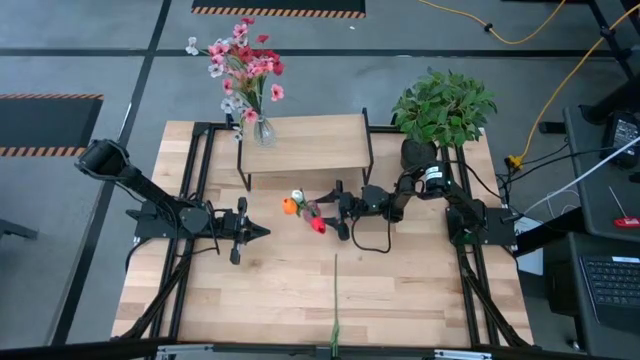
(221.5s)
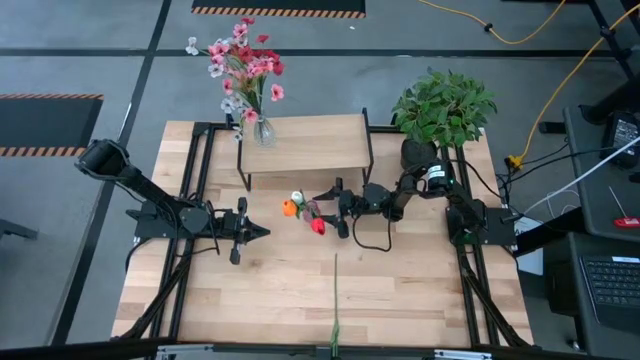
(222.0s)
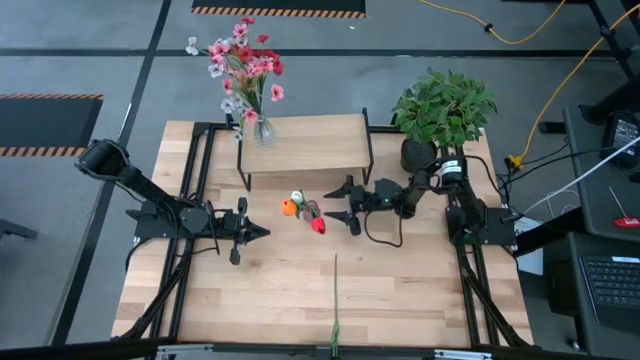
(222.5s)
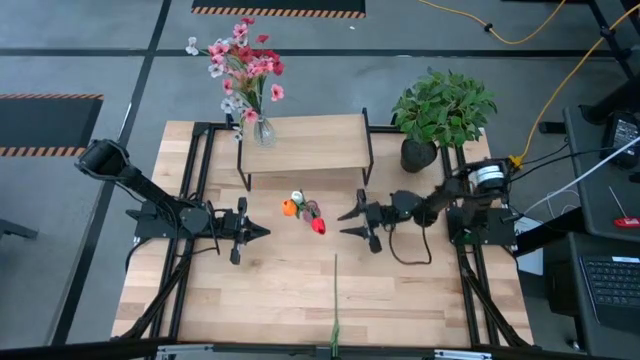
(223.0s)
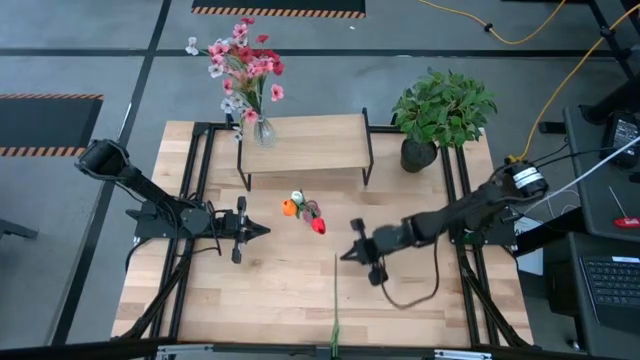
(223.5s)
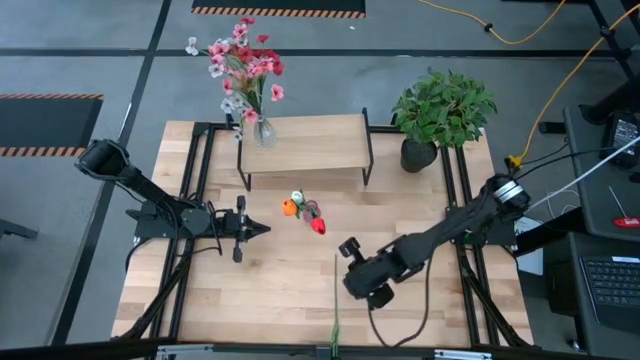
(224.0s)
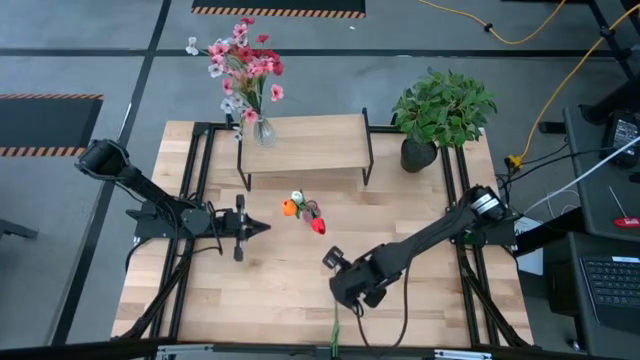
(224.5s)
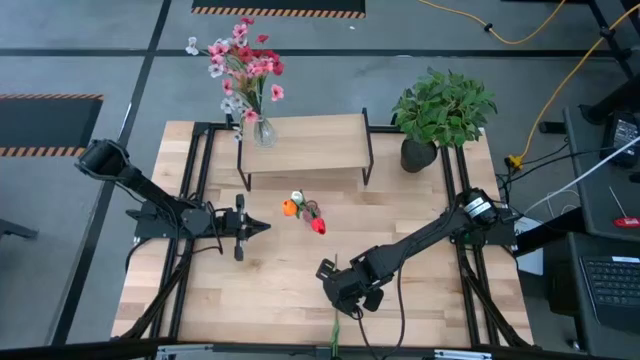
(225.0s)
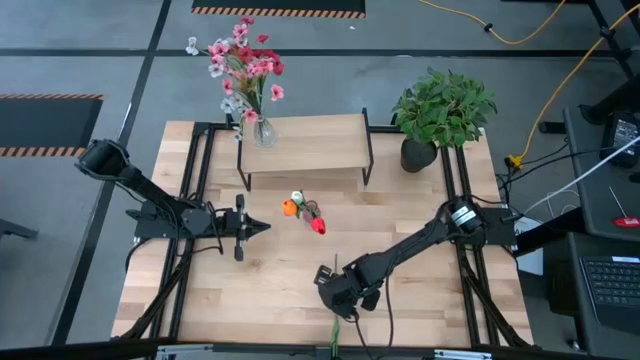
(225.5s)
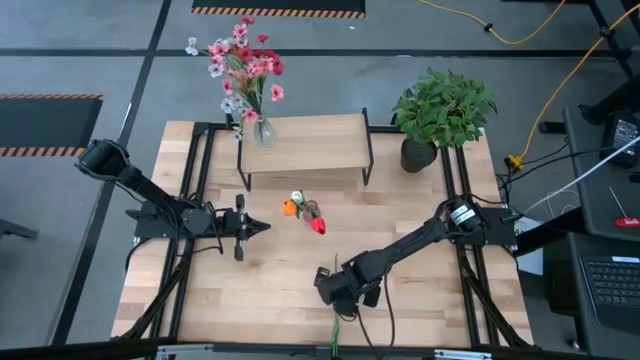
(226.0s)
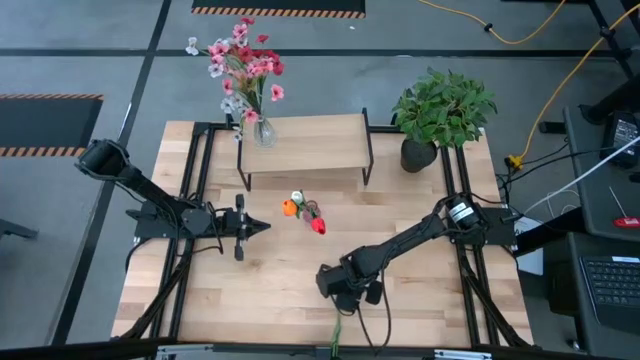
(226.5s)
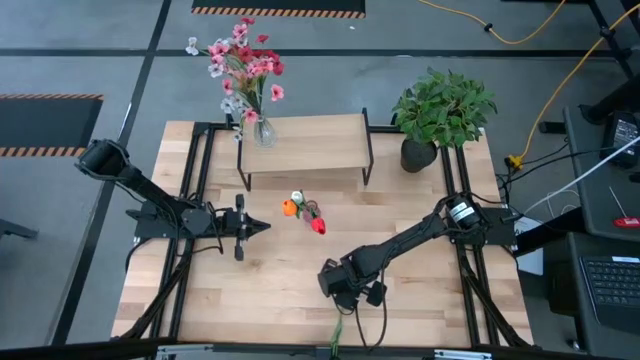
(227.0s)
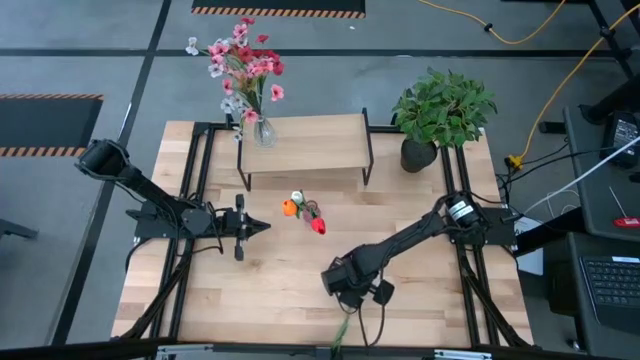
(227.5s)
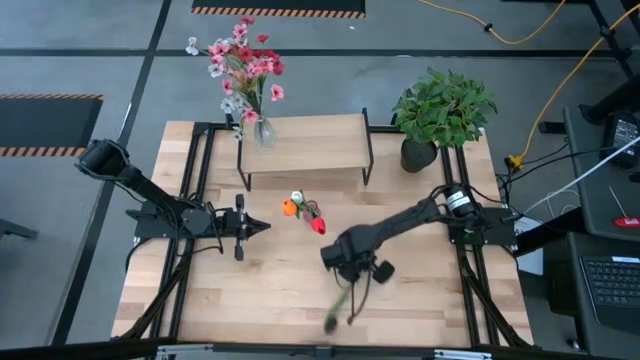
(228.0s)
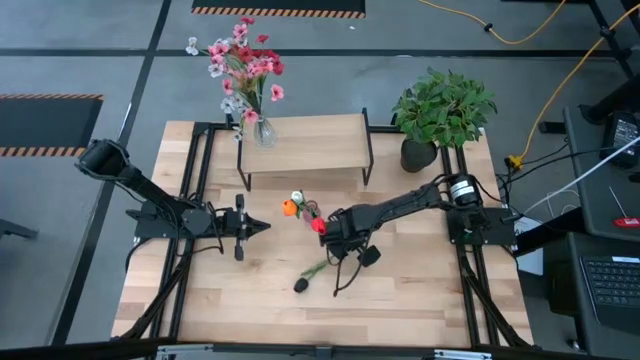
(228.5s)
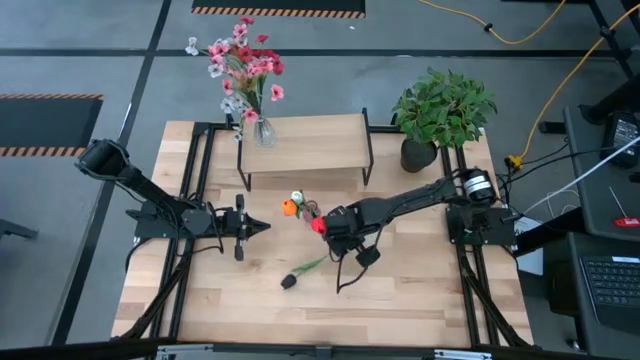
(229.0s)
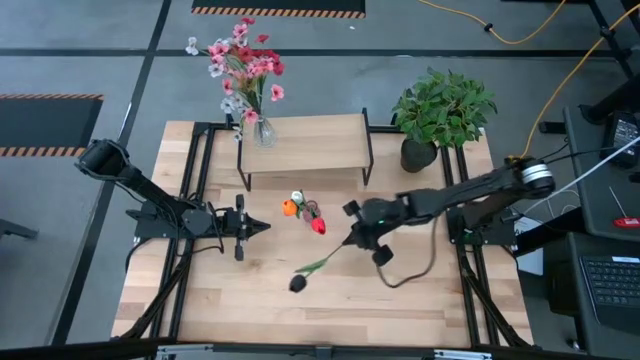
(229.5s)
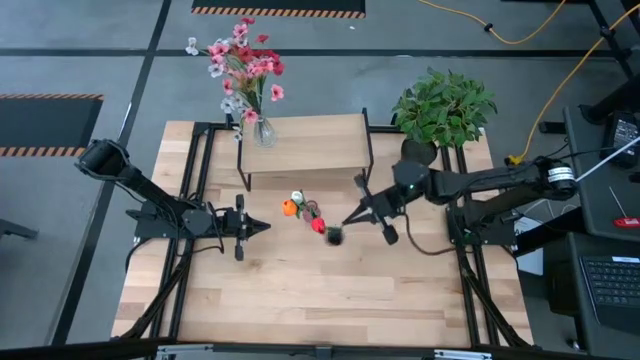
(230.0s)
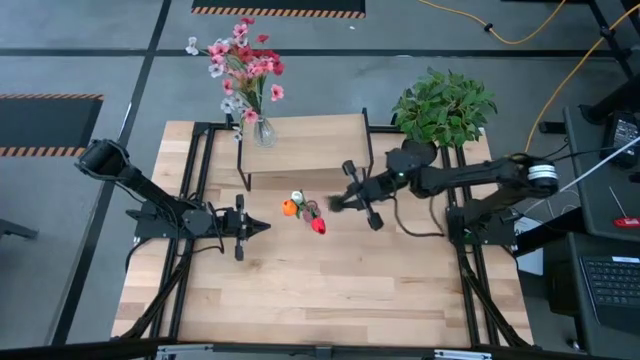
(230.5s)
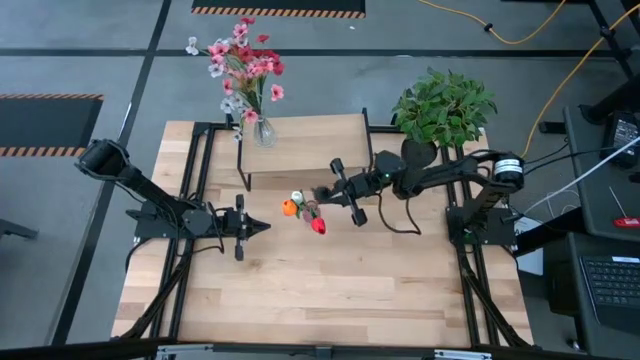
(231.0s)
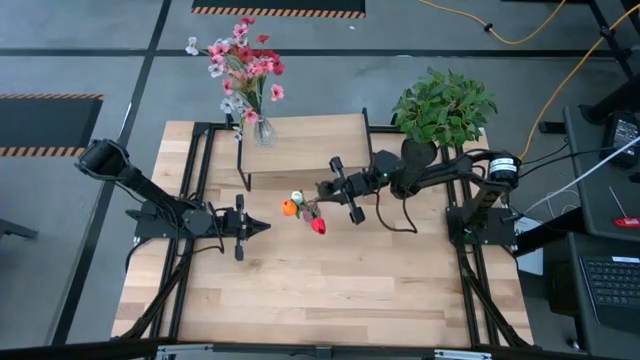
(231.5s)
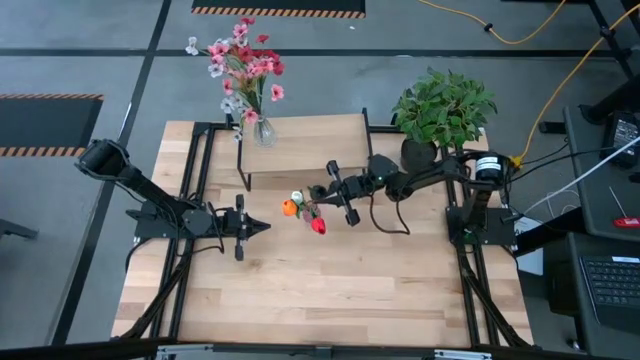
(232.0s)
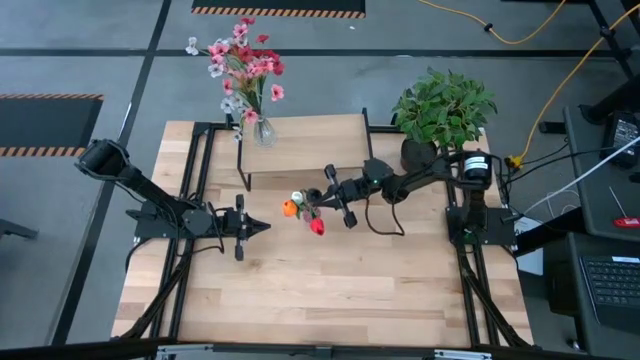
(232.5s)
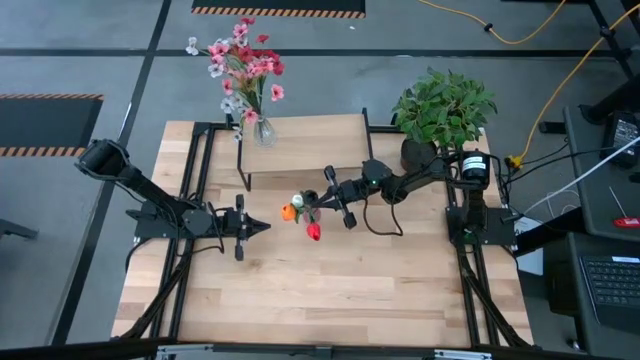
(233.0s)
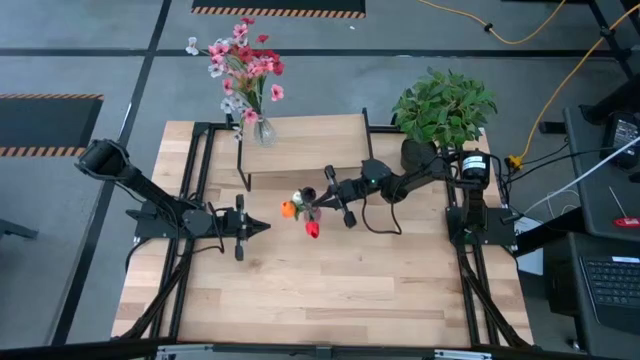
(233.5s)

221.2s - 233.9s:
Task: Pick and place flowers into a vace then onto a shelf
Put the black flower into the pink vase

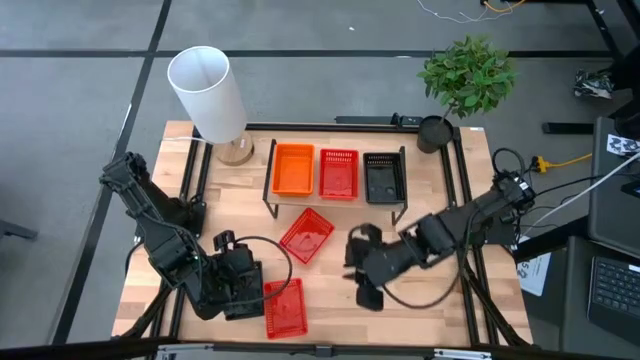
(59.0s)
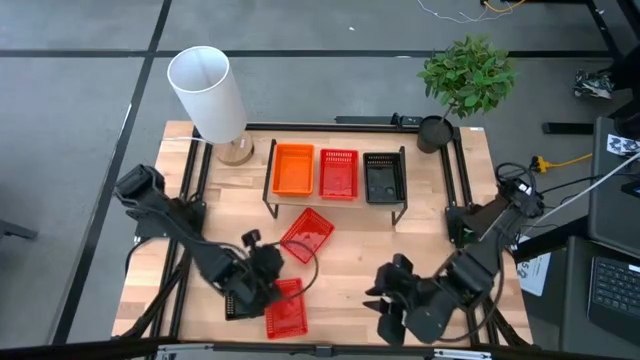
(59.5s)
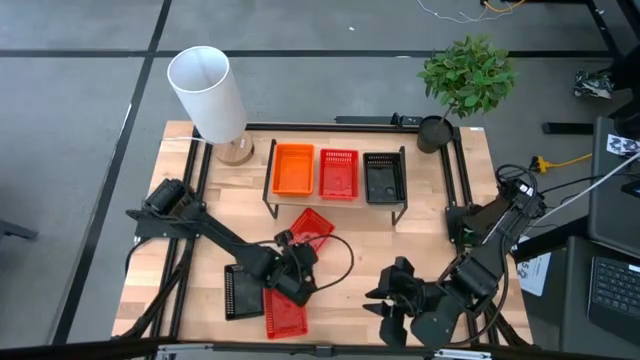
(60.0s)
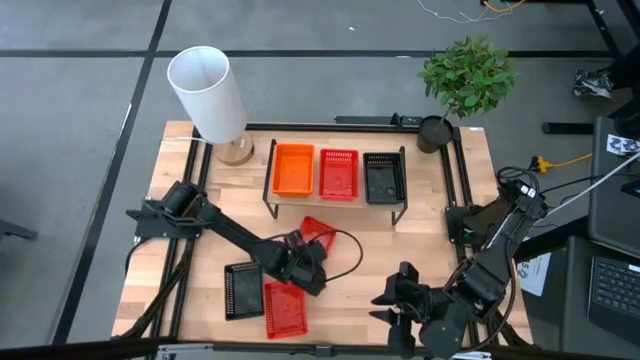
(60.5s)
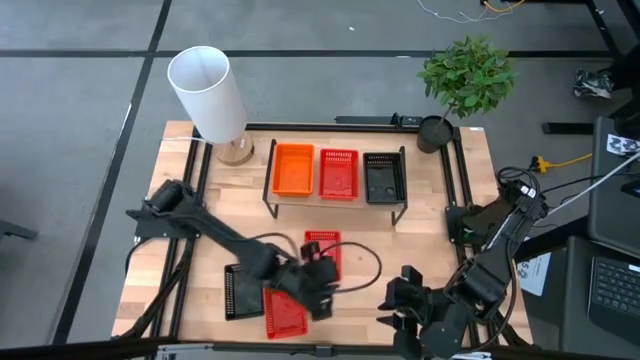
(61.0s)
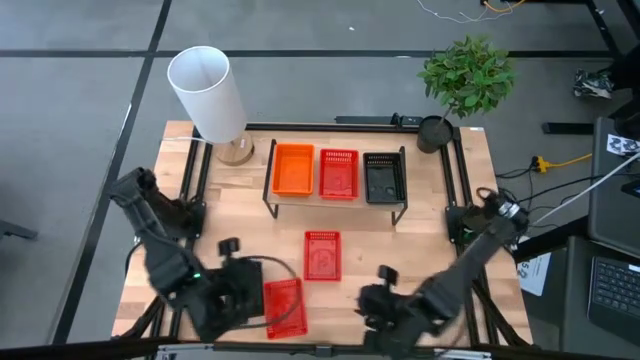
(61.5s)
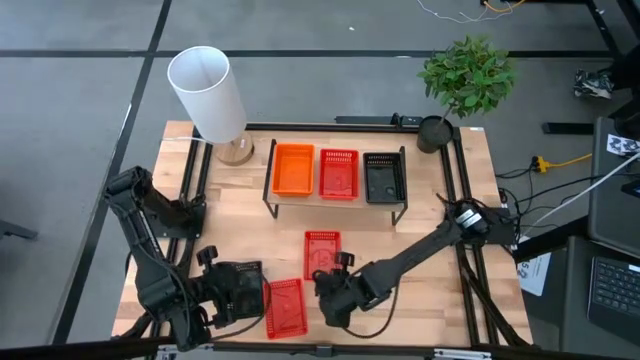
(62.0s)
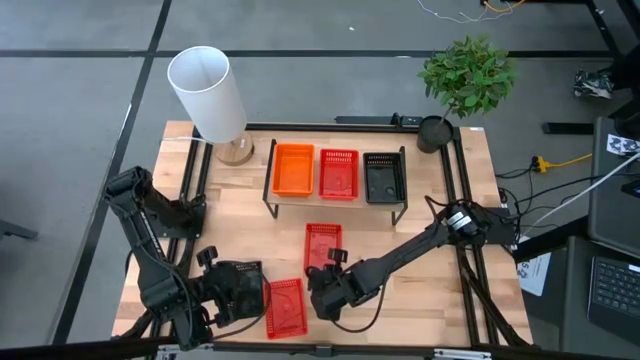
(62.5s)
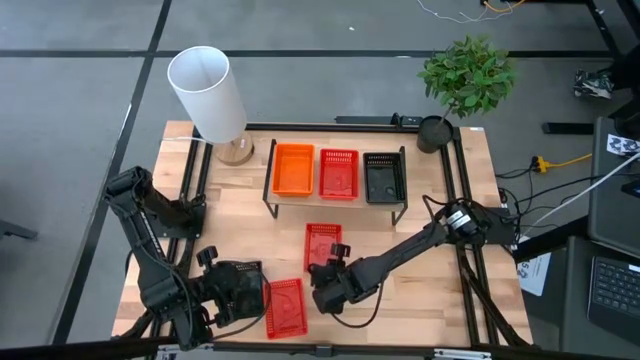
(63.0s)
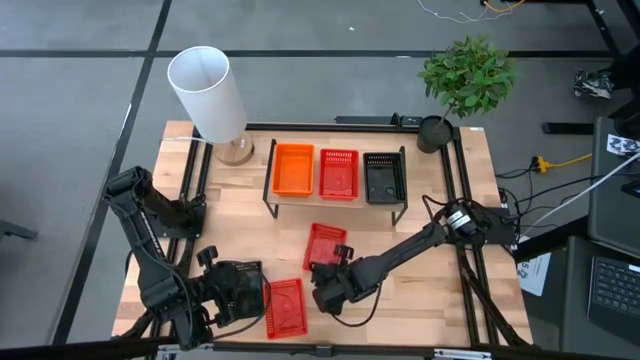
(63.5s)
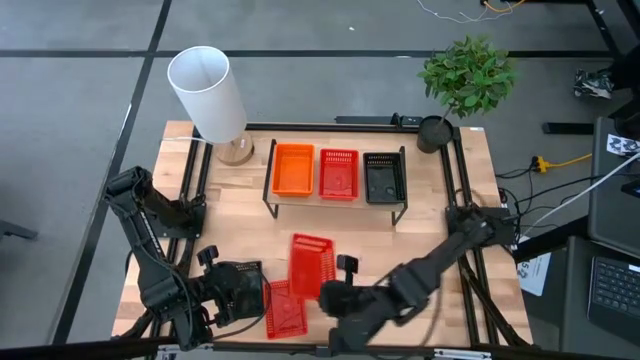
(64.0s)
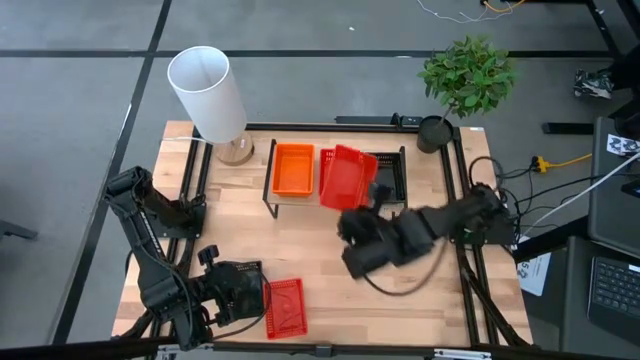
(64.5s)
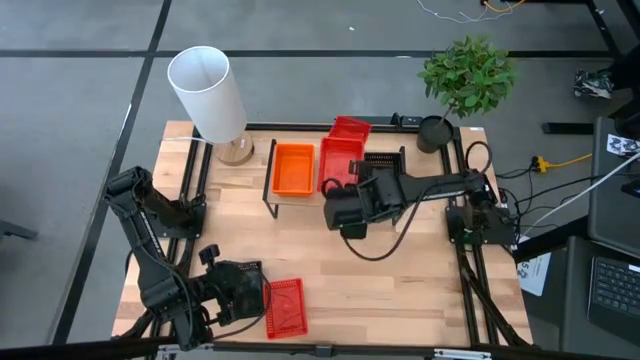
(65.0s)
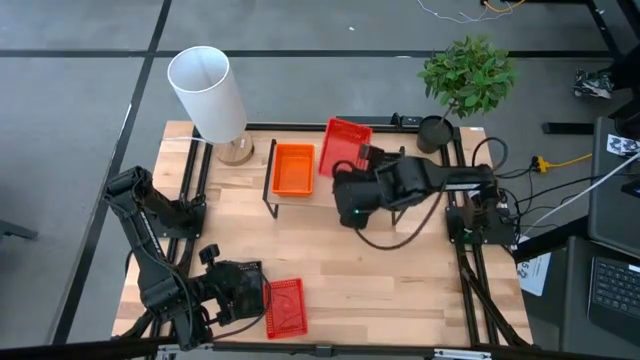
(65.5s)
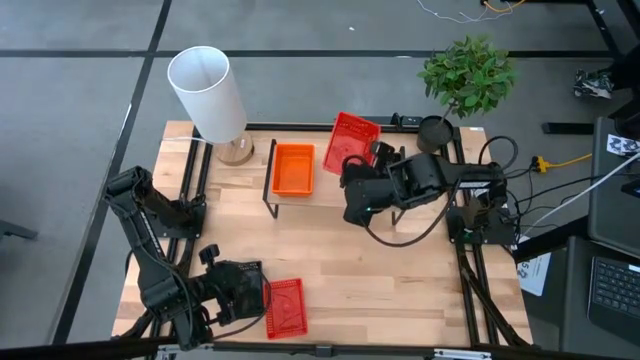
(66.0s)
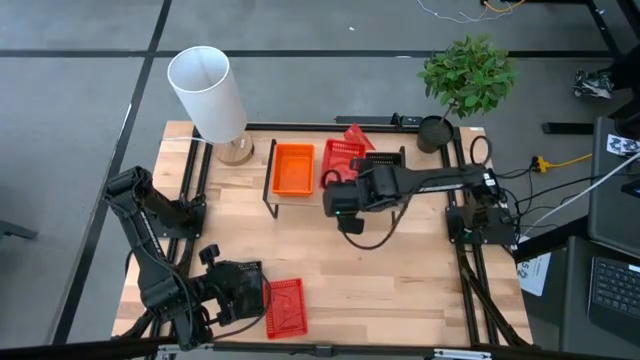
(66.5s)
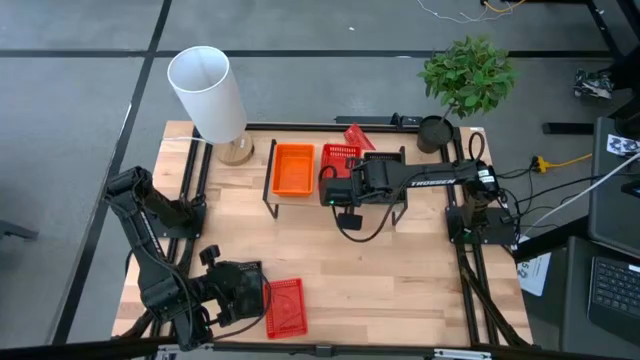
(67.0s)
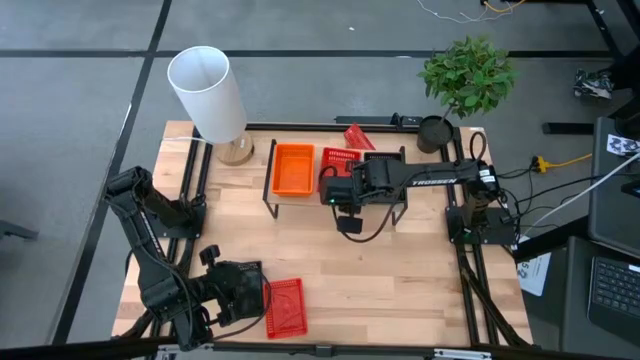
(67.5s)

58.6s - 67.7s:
Task: Stack baskets on shelf by color
Put the top red bin on the shelf
